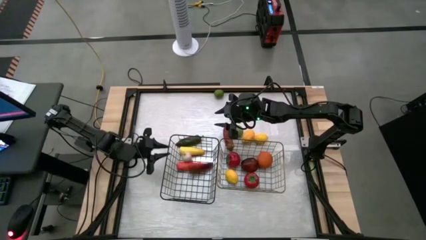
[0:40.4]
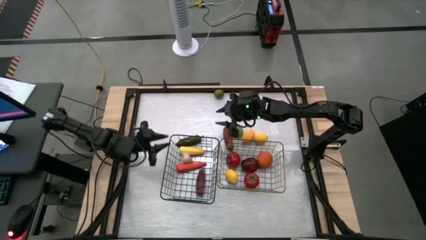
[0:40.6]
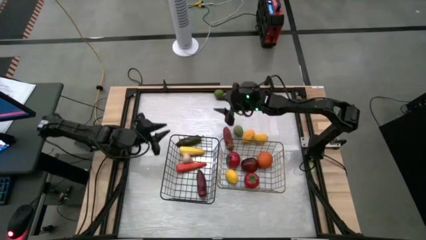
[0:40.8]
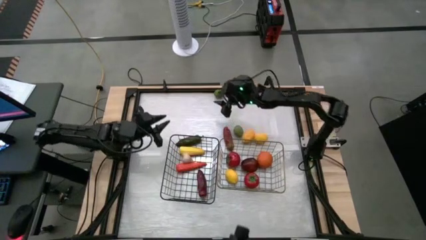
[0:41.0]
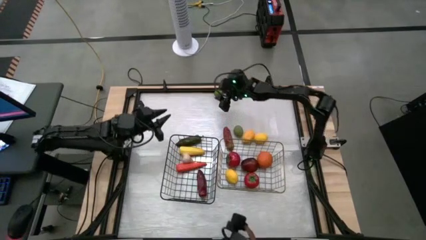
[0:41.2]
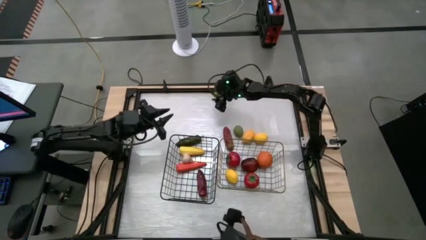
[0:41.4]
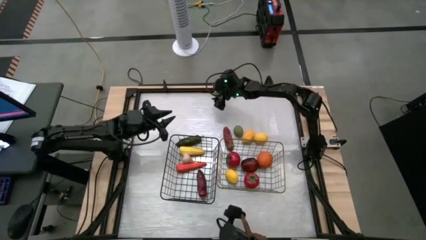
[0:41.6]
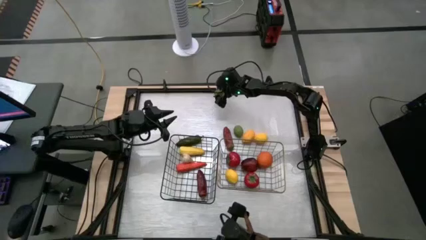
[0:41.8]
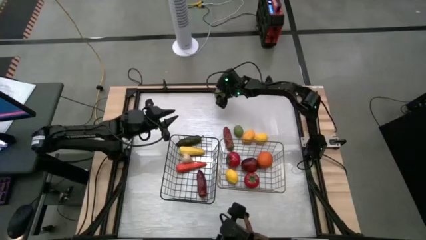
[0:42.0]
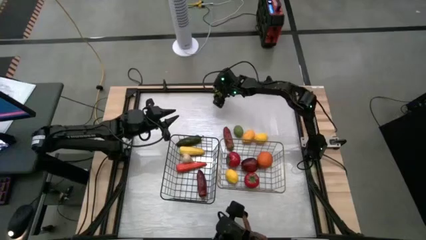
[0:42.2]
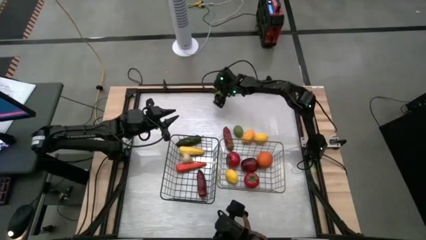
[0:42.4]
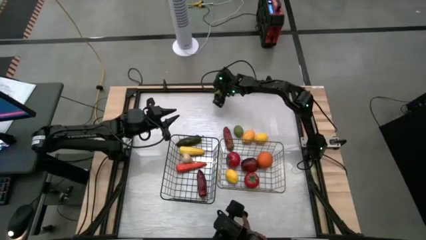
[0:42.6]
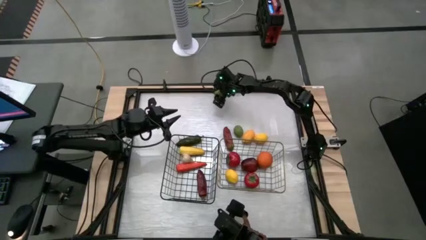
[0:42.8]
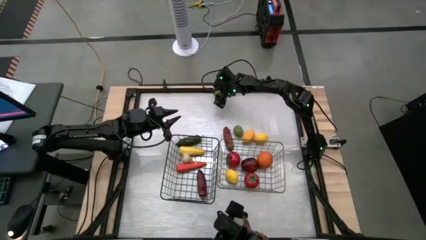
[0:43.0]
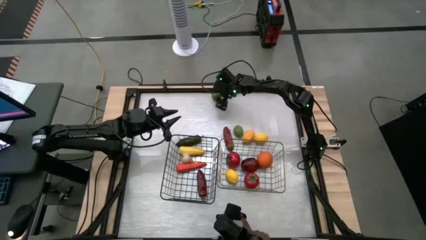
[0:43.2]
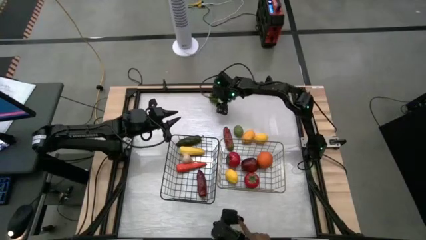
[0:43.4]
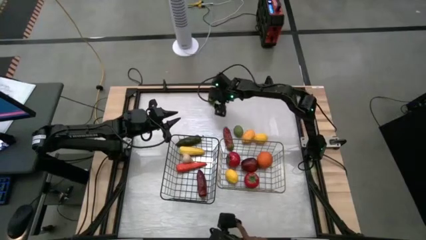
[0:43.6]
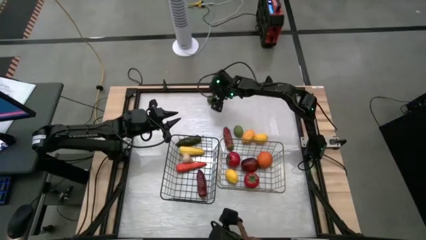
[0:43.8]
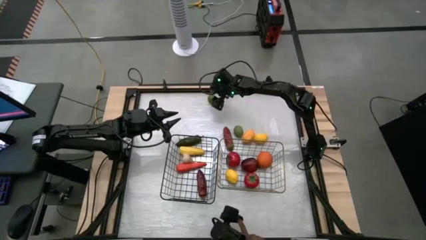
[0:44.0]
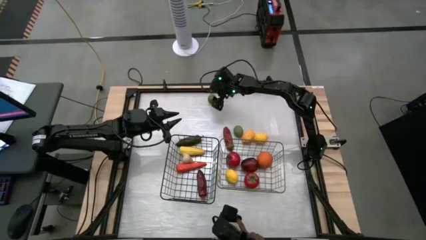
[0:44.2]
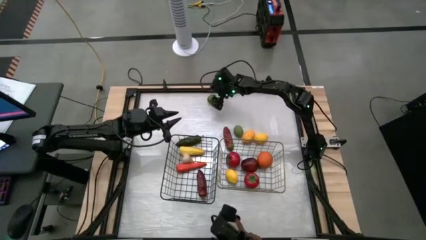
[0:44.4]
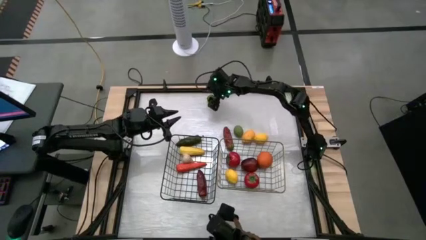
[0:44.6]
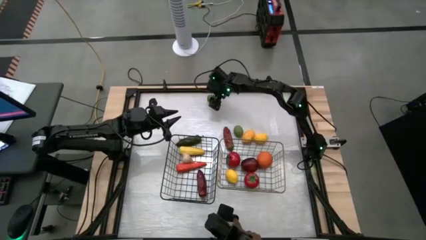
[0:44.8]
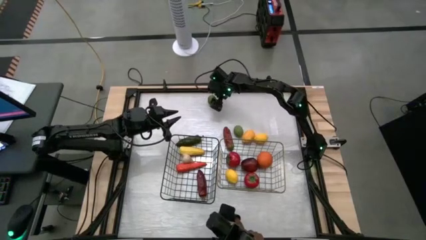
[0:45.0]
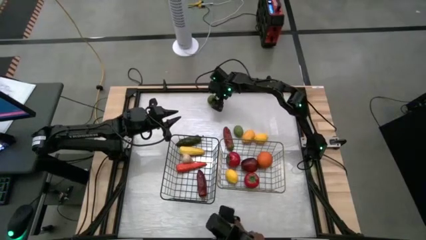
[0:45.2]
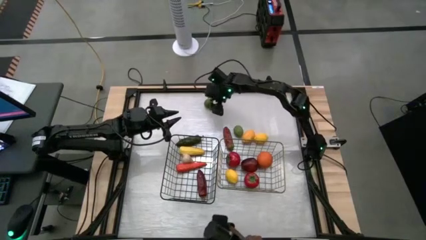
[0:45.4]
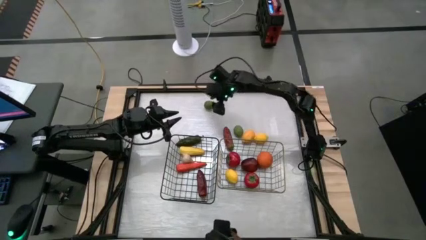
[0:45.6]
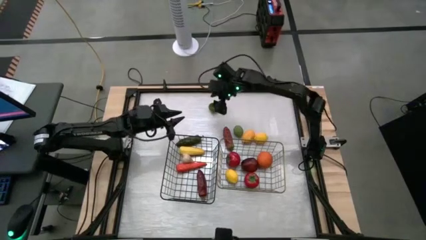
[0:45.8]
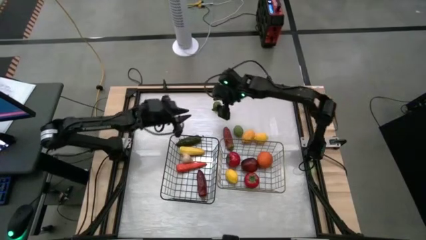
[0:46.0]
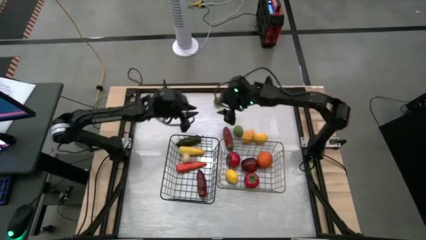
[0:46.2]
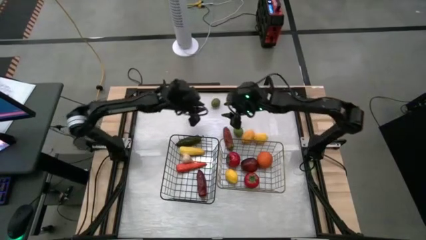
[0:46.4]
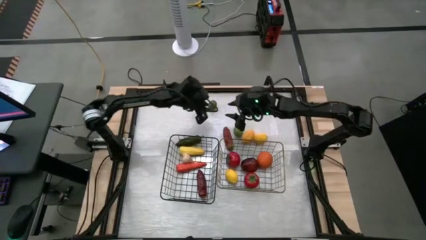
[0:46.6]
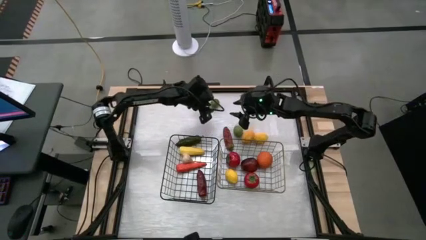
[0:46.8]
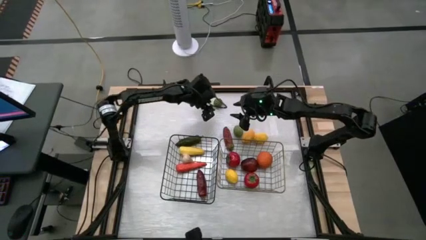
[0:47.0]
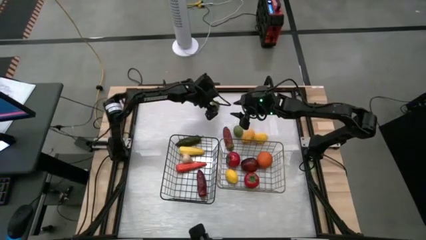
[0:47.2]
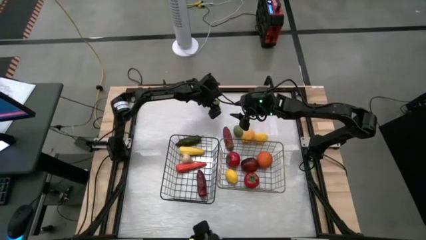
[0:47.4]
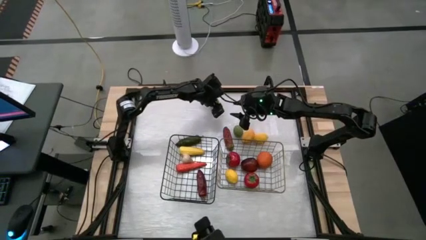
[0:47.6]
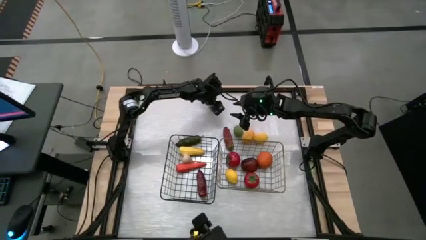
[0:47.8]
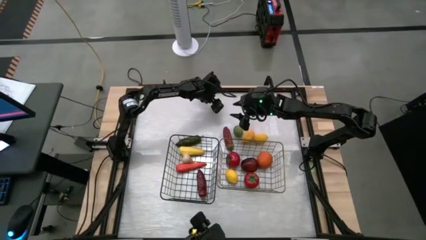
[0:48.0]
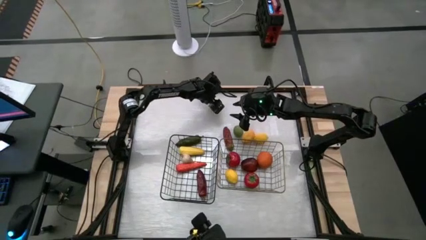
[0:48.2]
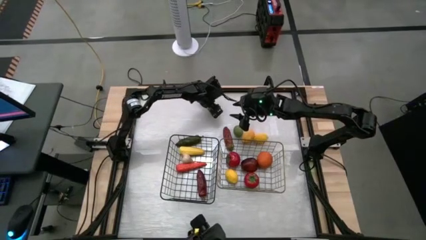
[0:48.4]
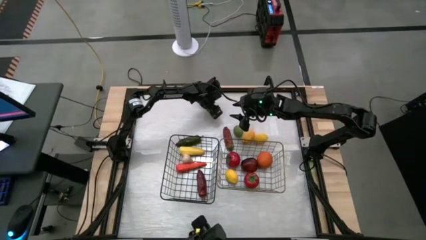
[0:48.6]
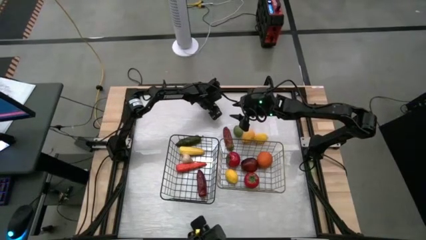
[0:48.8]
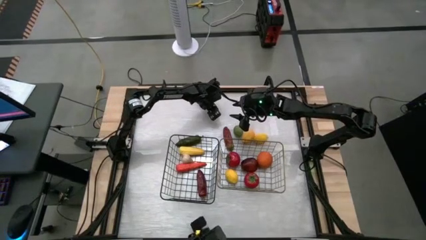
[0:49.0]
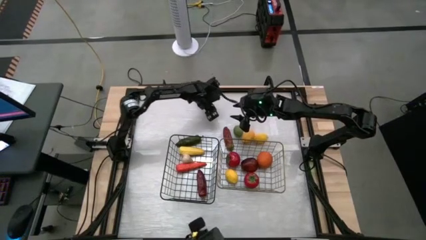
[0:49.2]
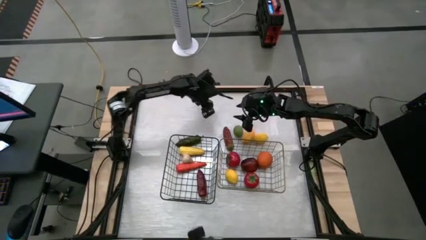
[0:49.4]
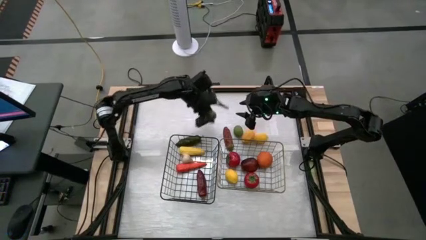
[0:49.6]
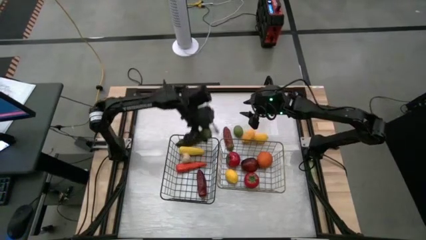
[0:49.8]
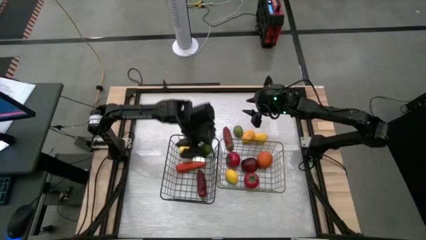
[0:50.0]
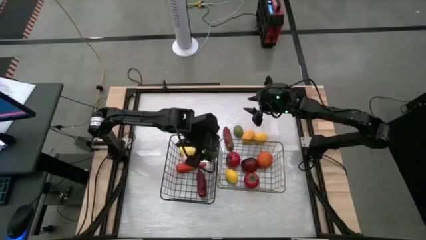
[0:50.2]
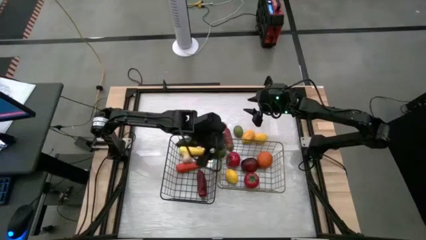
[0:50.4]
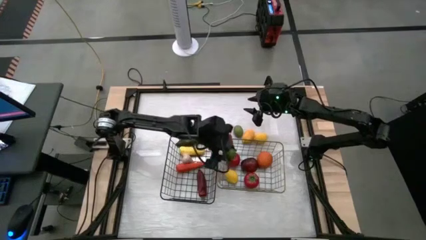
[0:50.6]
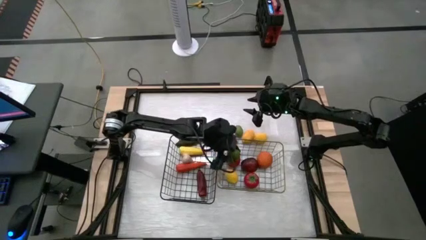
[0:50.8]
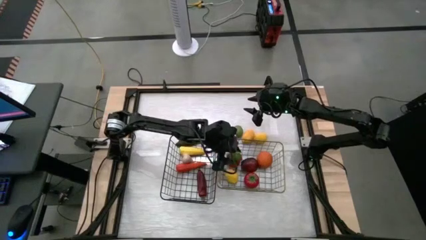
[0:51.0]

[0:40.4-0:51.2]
Task: Sort produce into baskets
Put the top green lime into the right wire basket

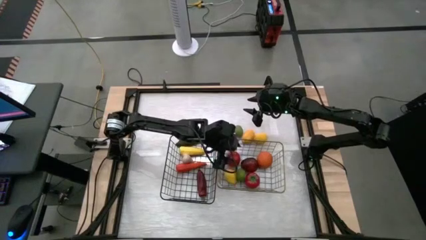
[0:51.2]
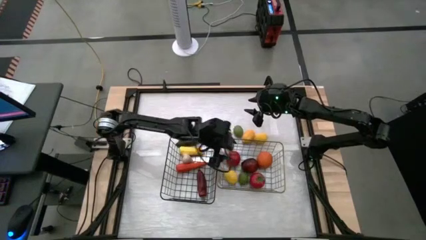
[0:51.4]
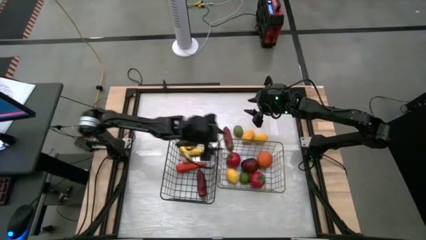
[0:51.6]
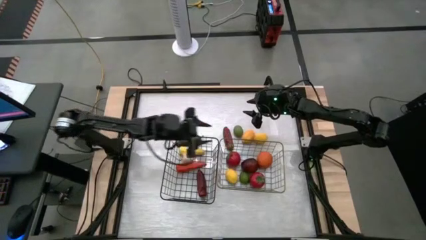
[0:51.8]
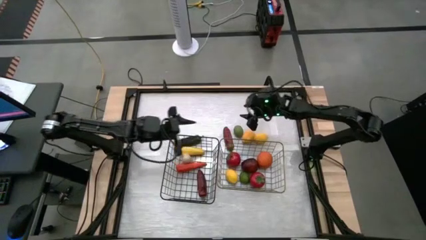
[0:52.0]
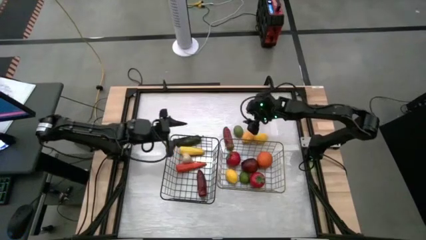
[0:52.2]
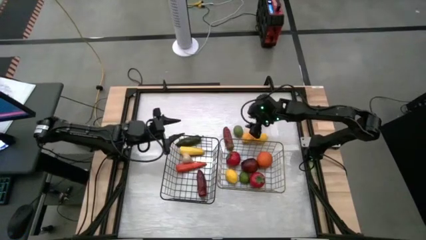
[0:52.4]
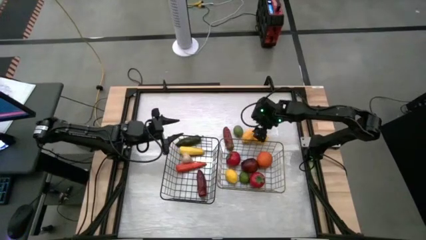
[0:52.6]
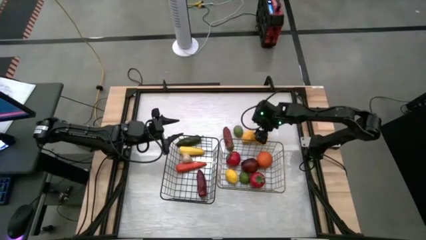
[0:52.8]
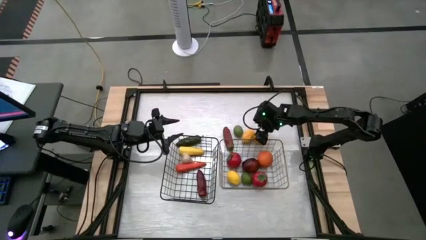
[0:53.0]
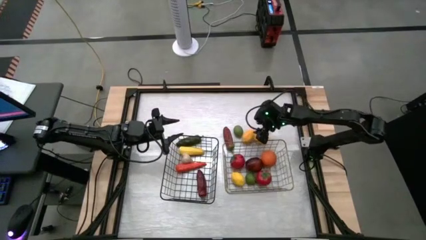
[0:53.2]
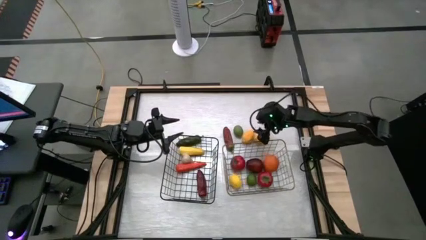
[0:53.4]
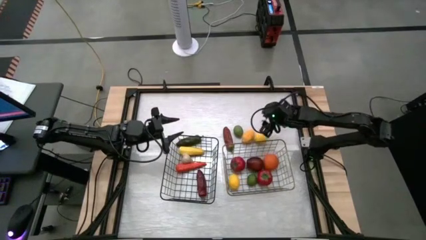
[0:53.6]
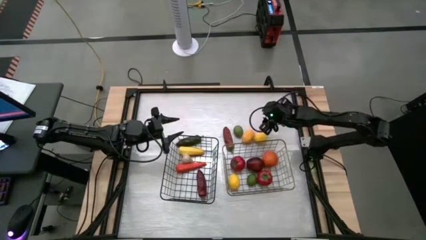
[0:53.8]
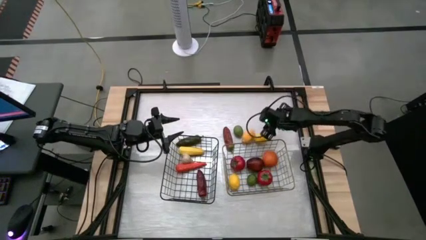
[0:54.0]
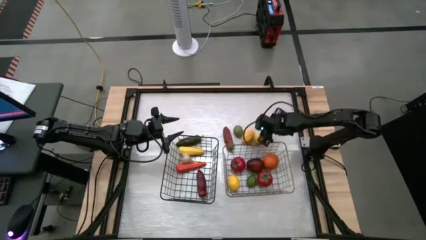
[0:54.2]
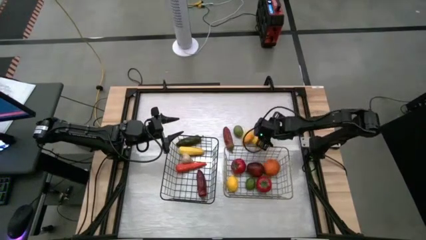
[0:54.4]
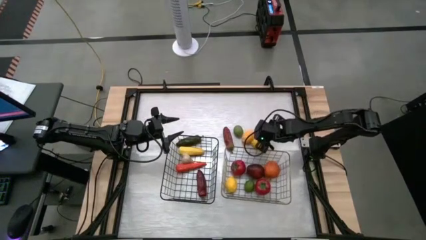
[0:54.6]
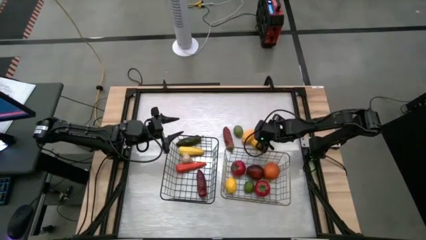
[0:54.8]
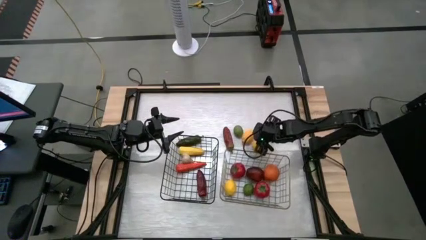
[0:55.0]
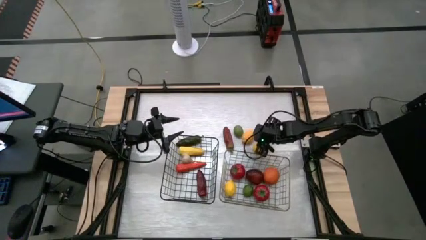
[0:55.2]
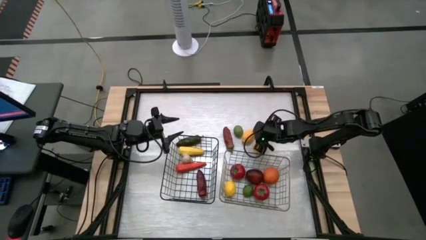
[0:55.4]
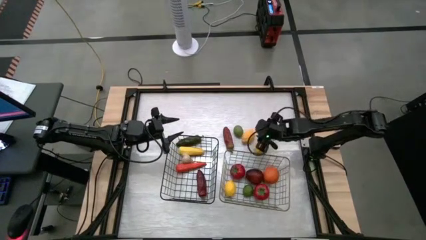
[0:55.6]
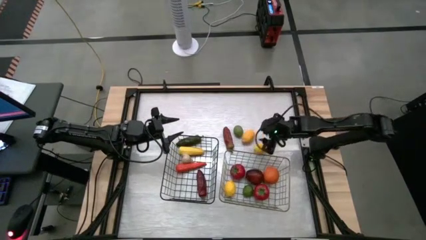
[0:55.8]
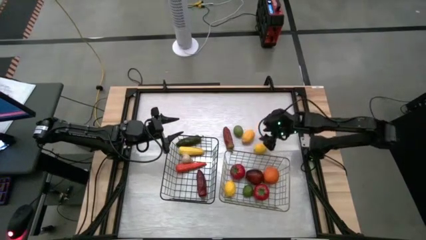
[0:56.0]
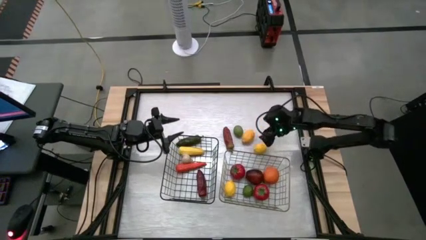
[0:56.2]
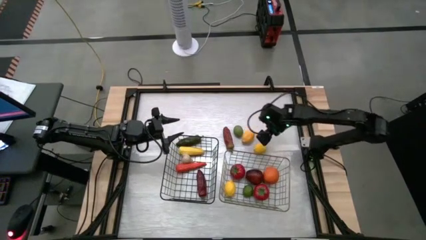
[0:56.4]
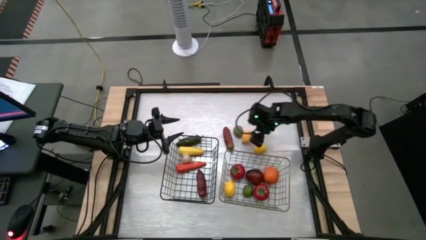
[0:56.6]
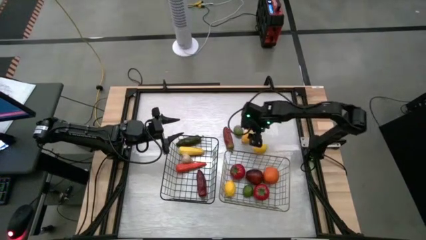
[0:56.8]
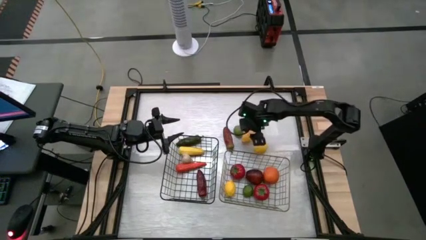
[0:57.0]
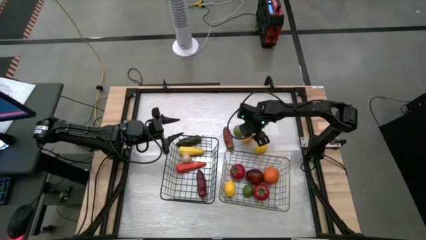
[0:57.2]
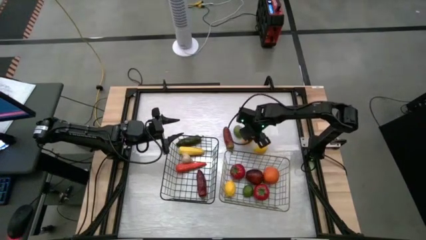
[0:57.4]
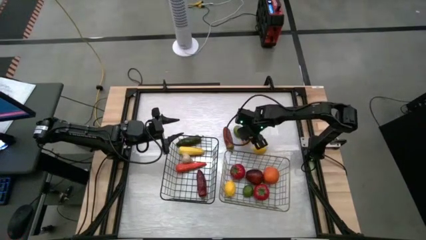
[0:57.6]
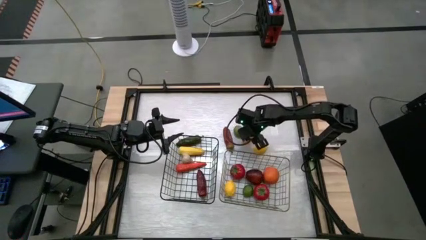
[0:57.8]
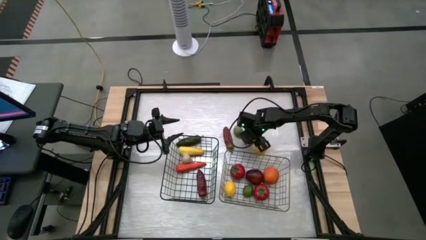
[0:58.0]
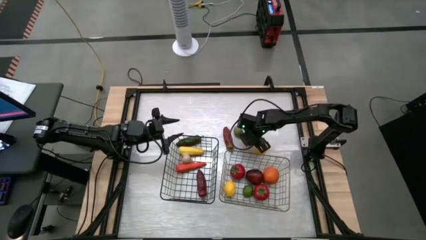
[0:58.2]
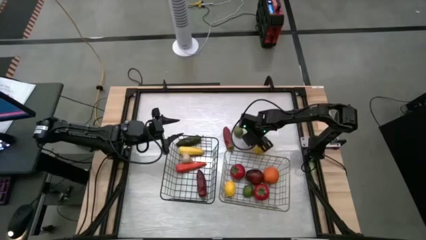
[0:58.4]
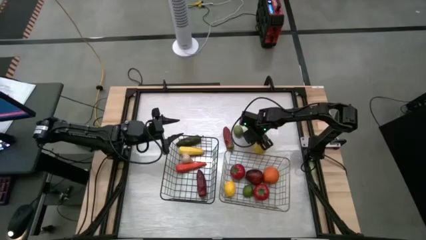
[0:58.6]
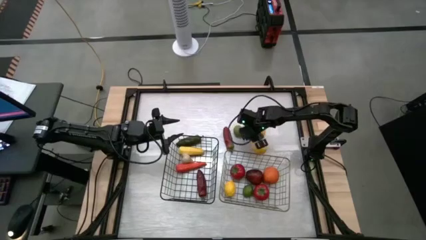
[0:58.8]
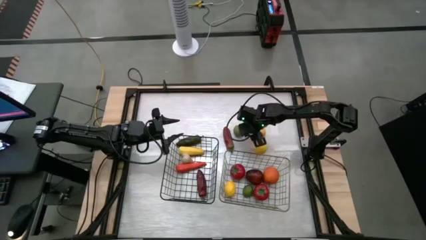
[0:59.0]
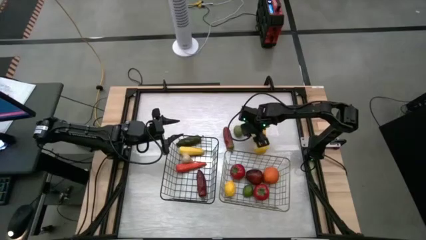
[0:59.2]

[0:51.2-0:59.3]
Put the left lemon into the right wire basket
